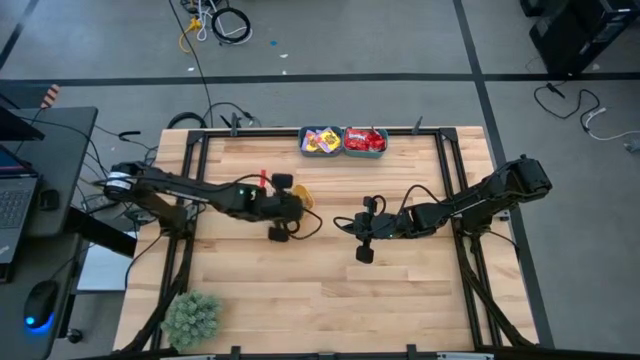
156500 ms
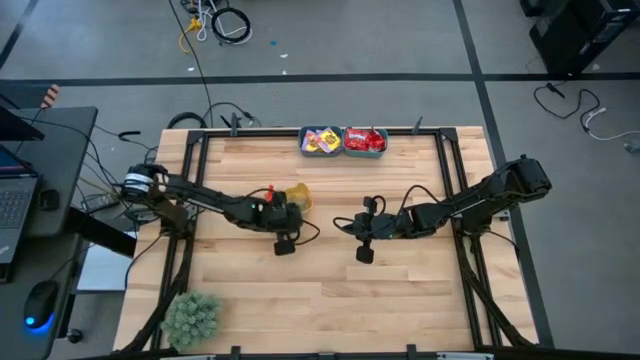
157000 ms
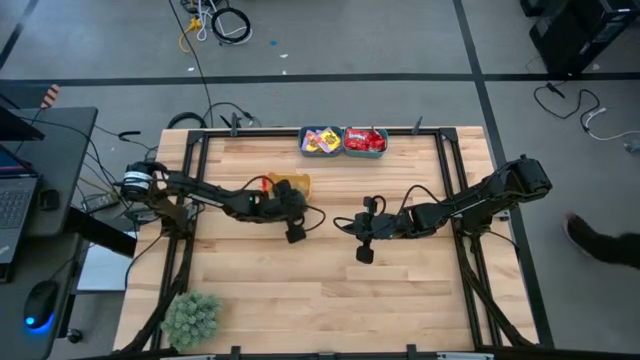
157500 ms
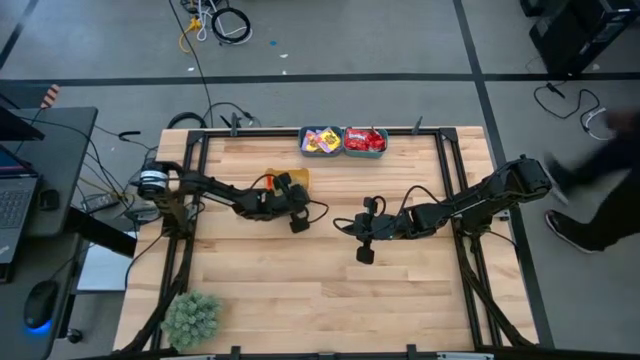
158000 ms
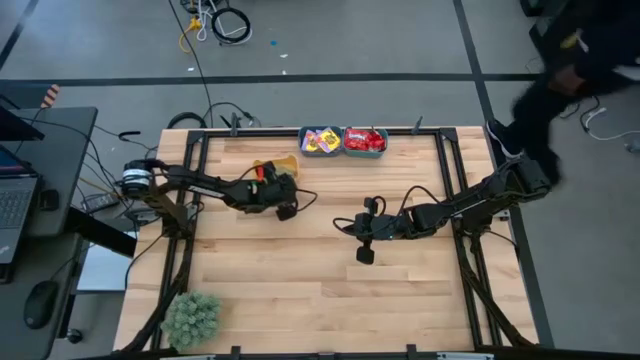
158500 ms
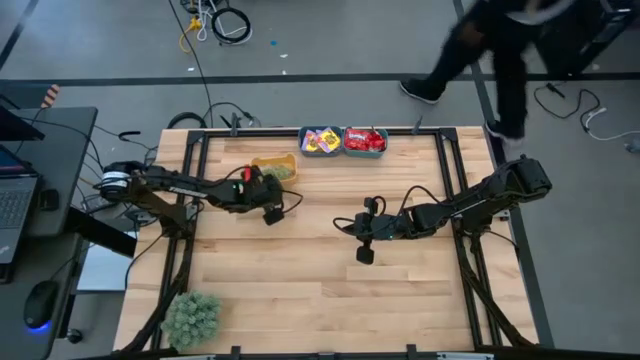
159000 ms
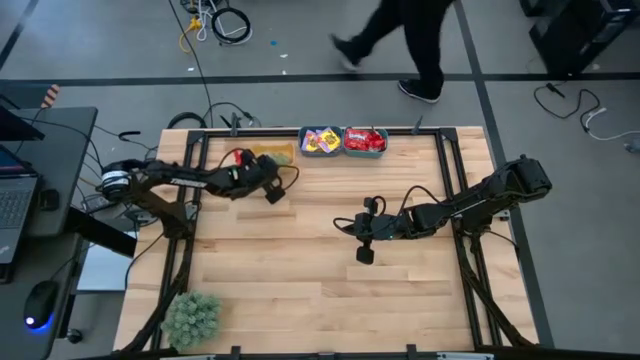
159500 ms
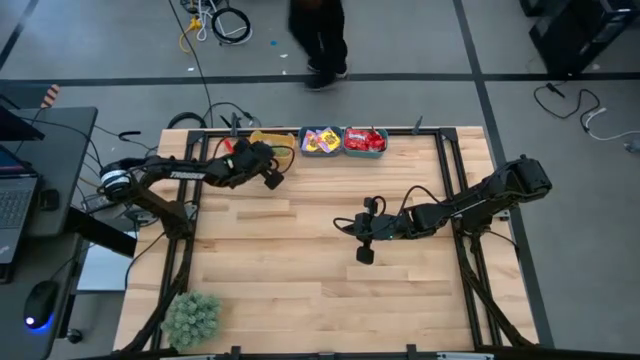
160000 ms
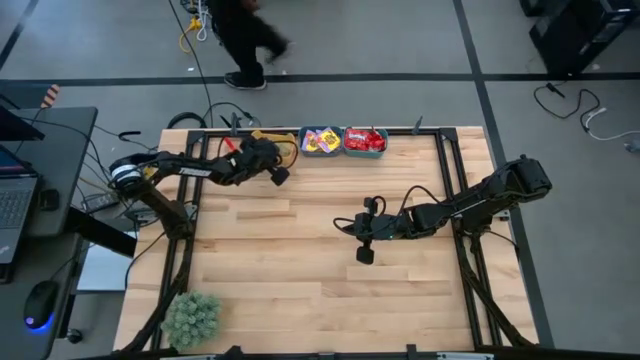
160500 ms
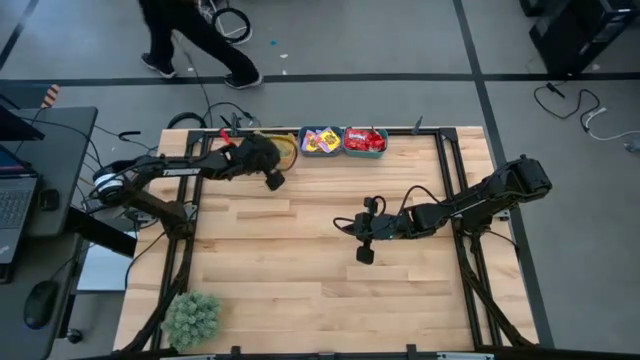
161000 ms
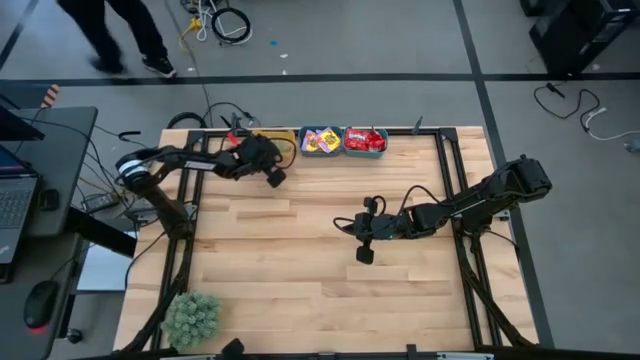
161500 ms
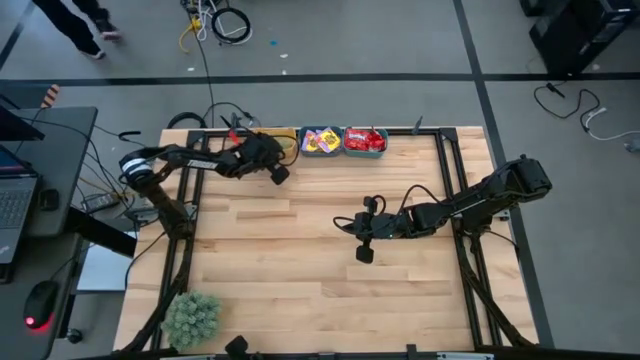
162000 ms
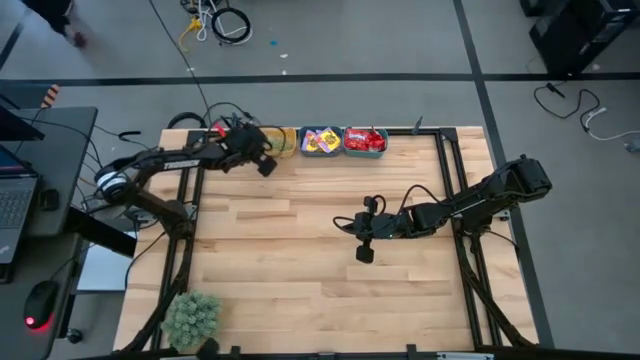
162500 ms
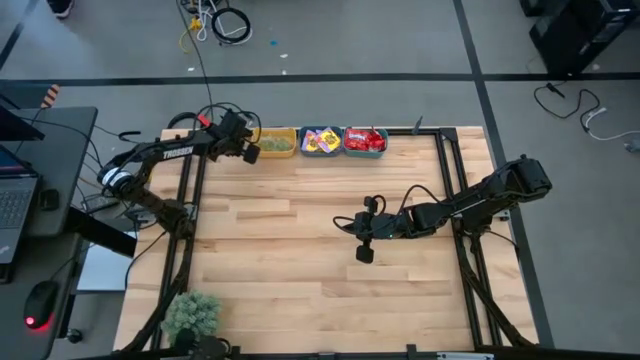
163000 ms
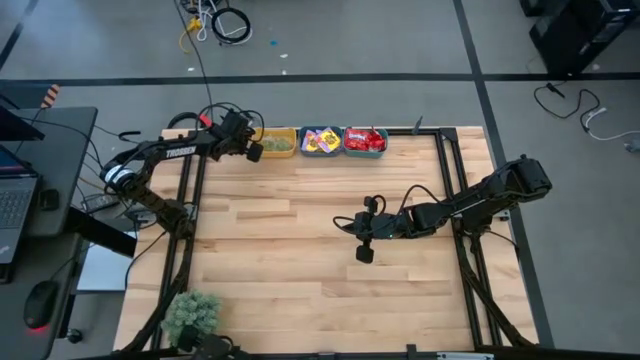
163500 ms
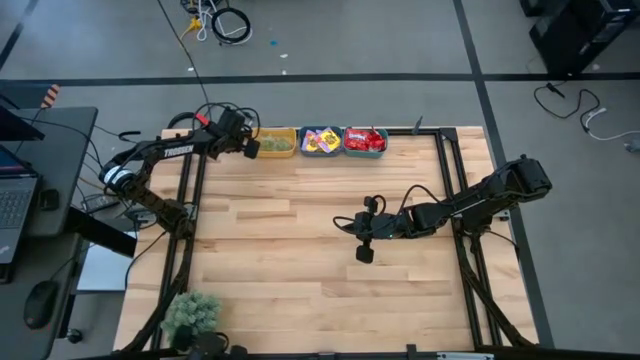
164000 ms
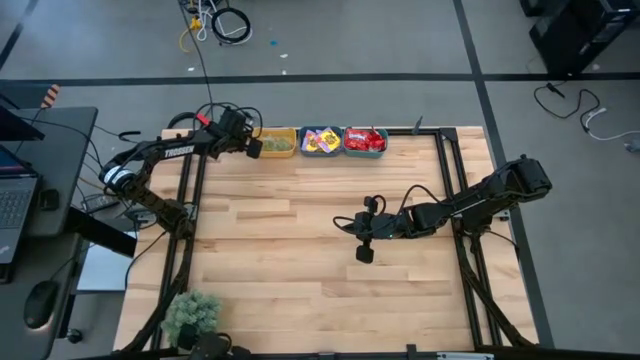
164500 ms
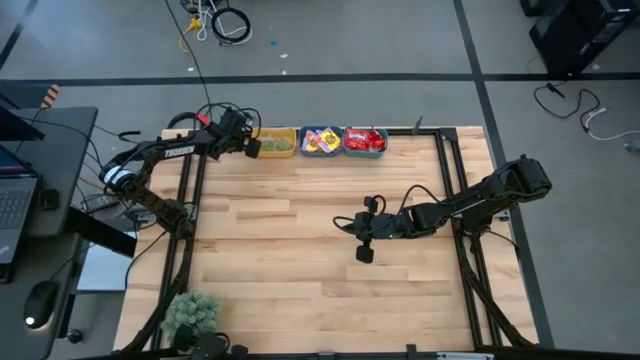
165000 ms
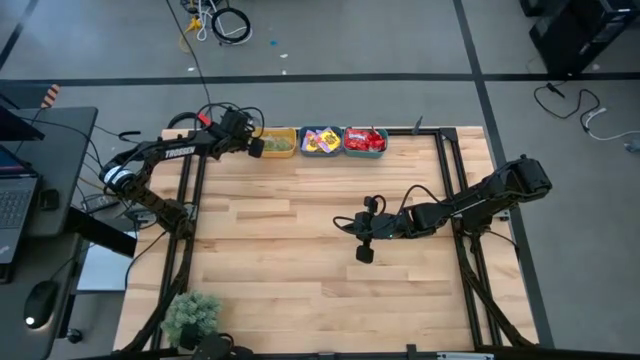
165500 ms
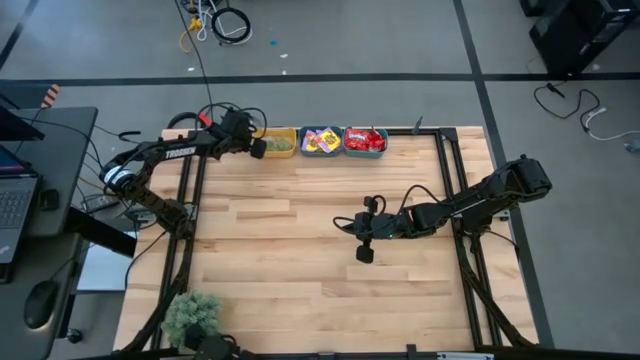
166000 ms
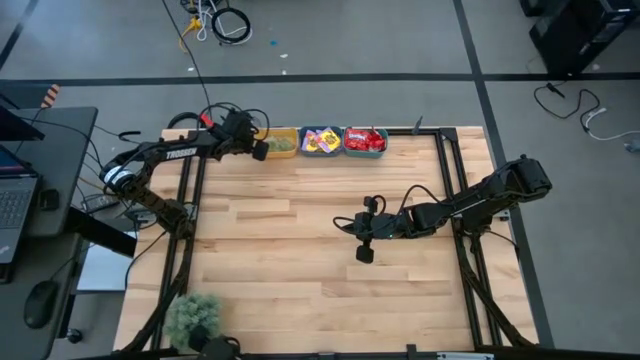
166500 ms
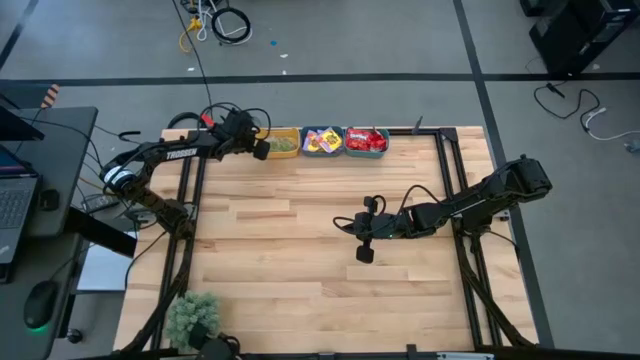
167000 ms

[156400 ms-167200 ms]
Task: Sort candy
Move the yellow bin to the left side of the blue bin

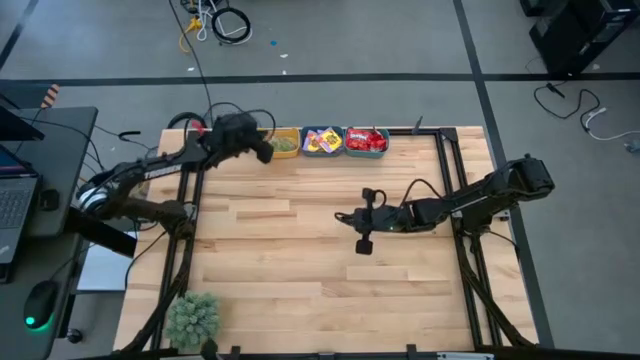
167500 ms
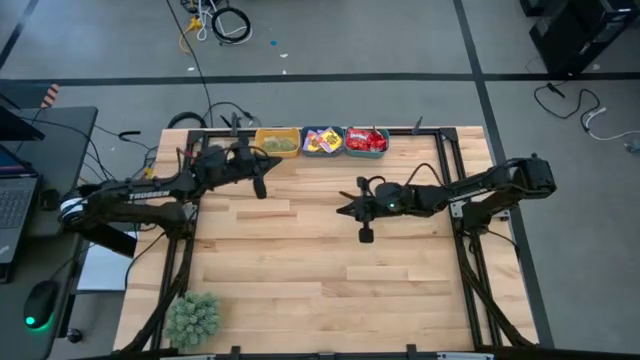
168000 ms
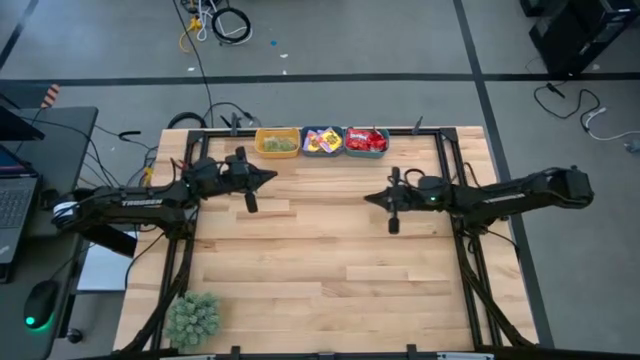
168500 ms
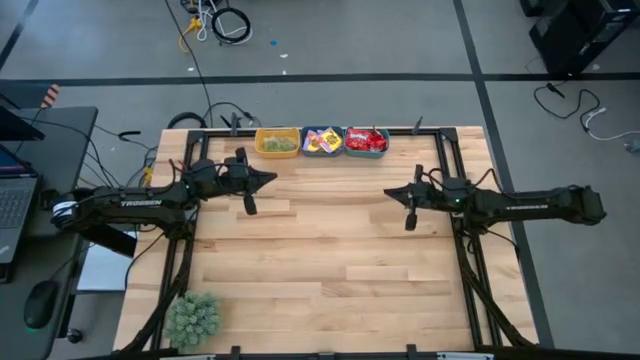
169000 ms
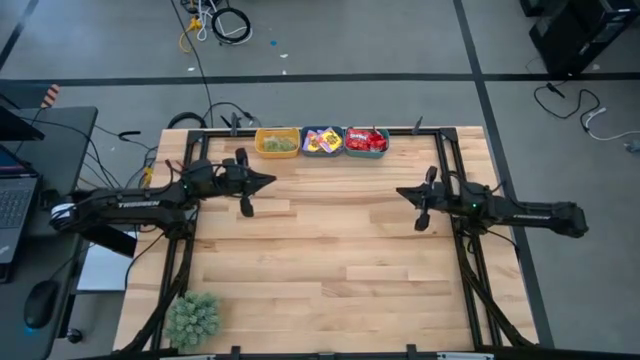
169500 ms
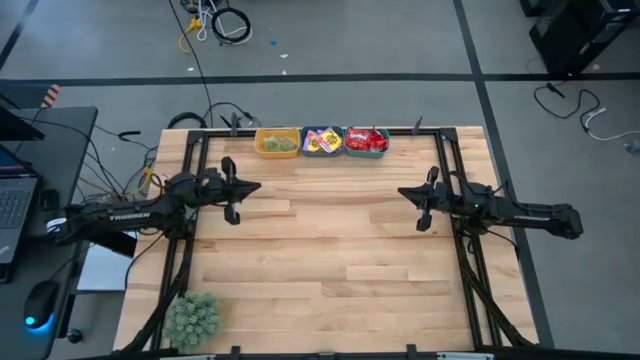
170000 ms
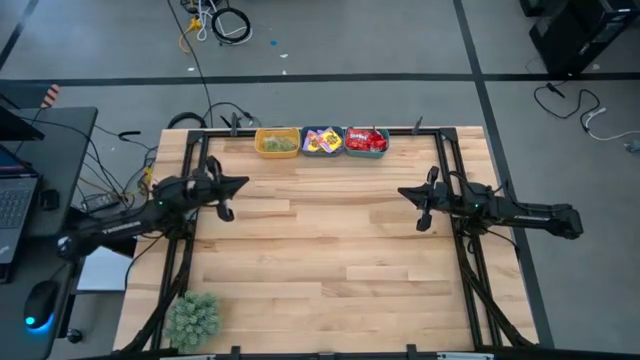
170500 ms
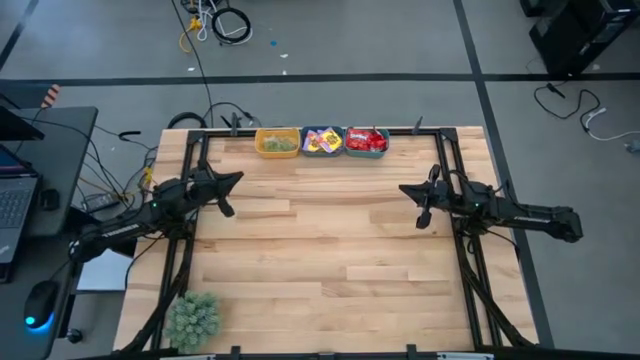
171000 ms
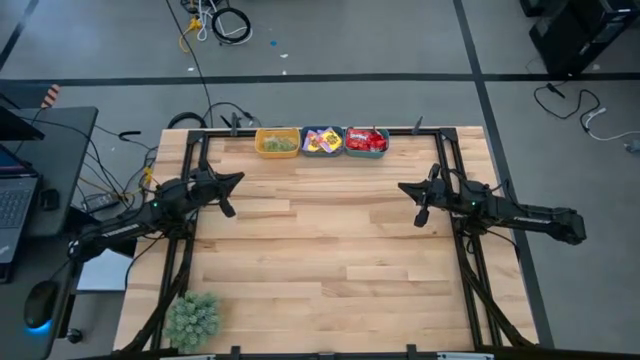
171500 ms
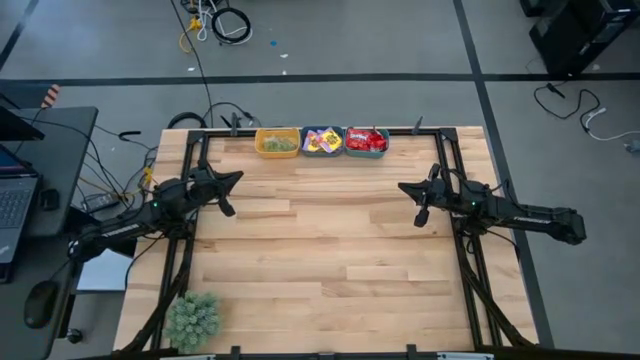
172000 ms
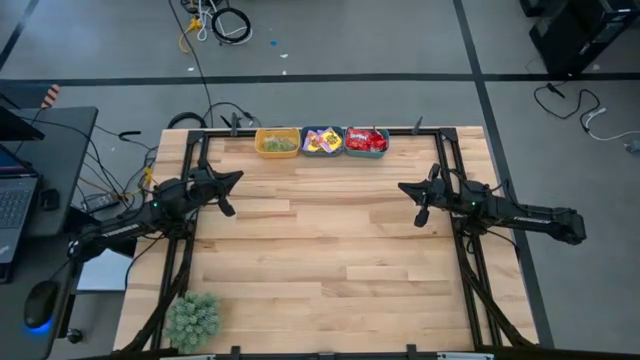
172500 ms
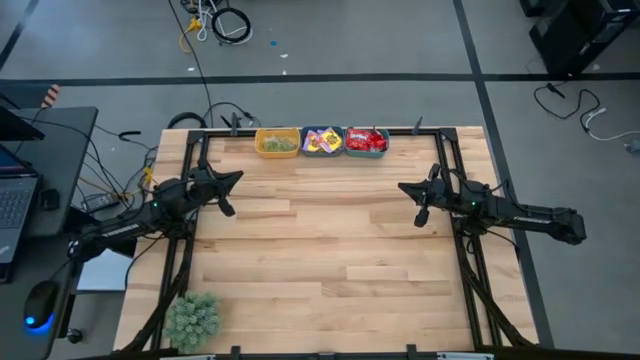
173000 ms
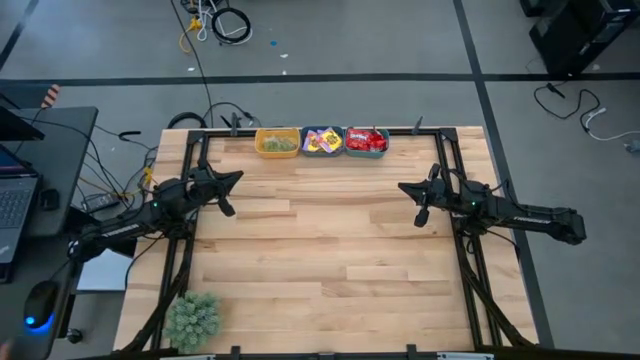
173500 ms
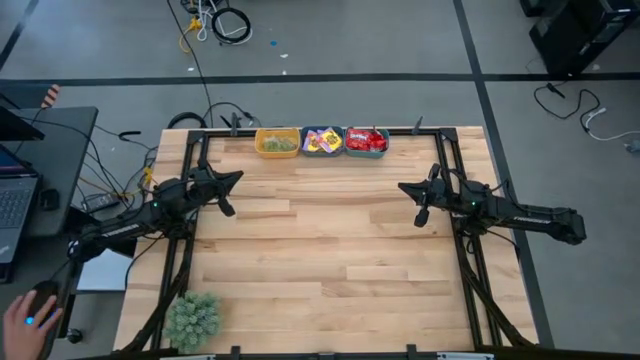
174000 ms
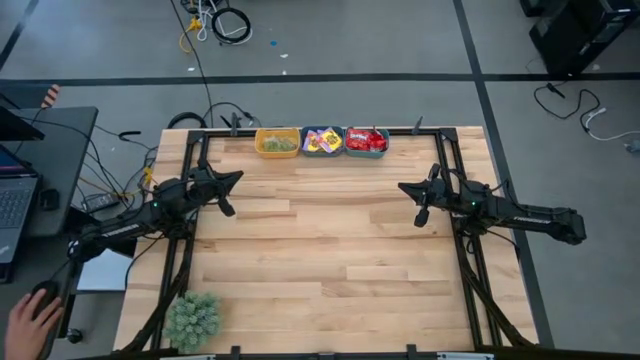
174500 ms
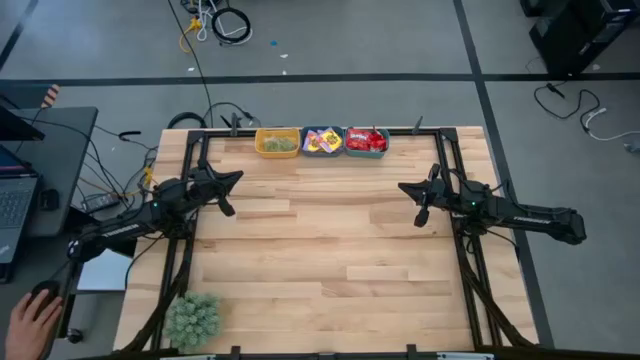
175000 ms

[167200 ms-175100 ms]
Return to Home Position

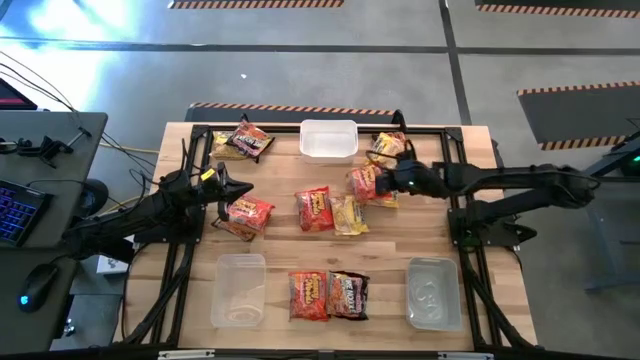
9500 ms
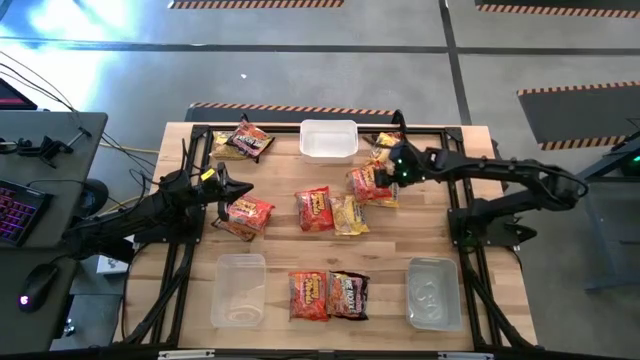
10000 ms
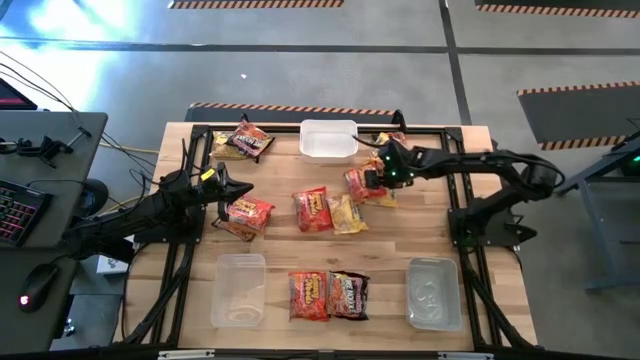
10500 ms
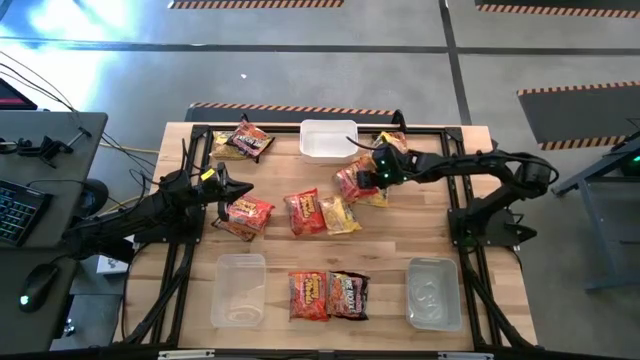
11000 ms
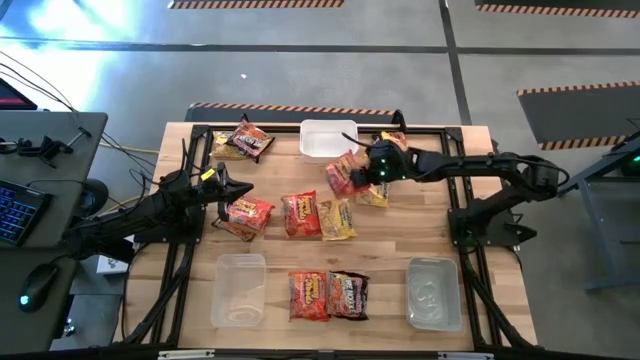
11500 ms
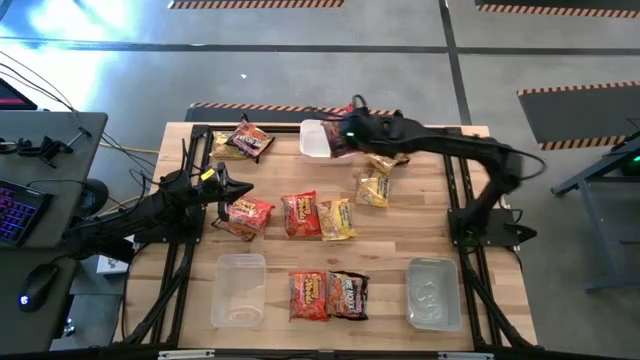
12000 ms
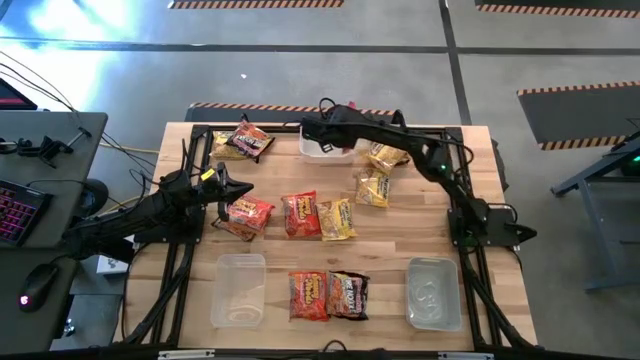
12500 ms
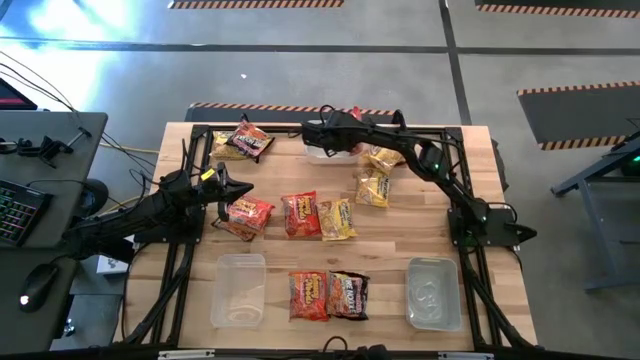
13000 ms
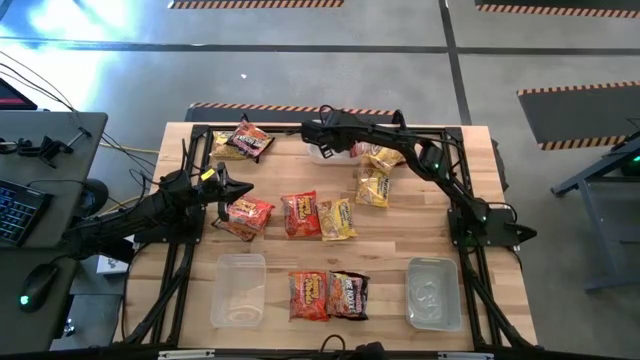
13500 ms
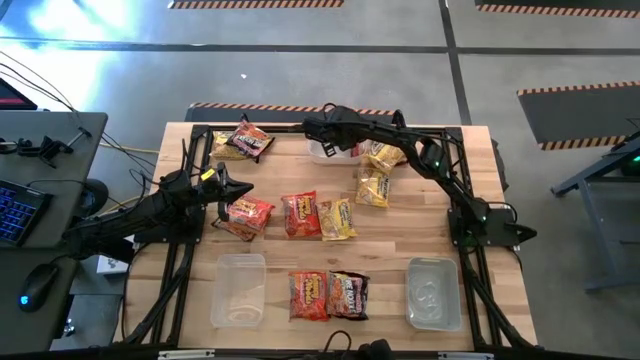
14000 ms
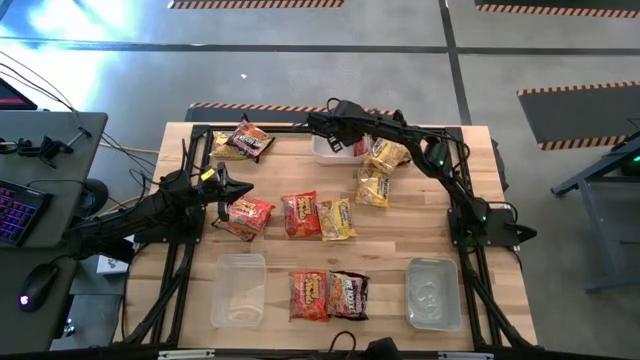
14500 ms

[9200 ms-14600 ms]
Task: Sort Maruchan noodles
Put the orange noodle pack into the white bin
